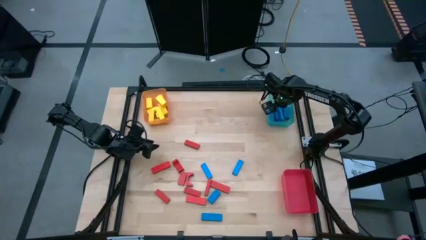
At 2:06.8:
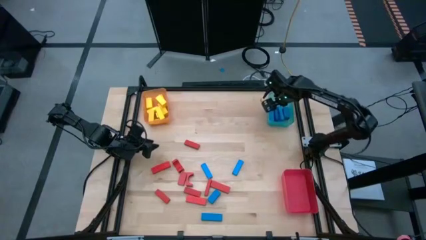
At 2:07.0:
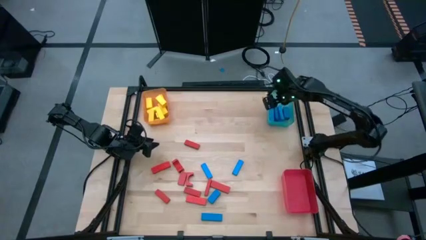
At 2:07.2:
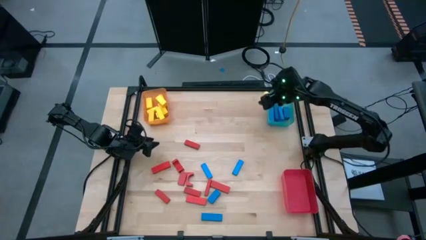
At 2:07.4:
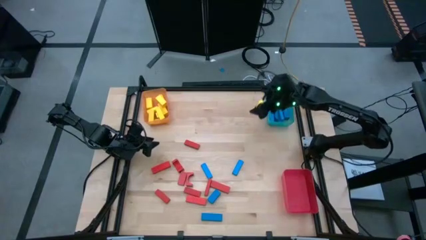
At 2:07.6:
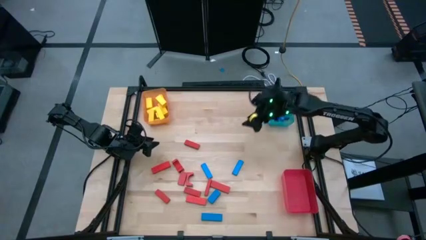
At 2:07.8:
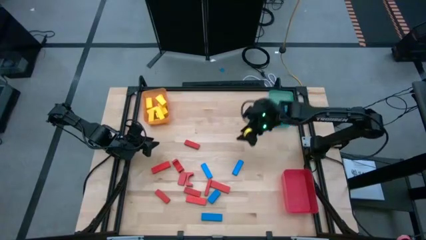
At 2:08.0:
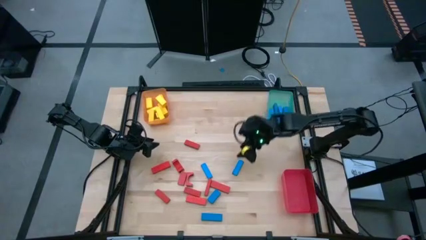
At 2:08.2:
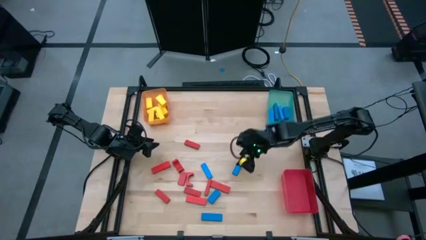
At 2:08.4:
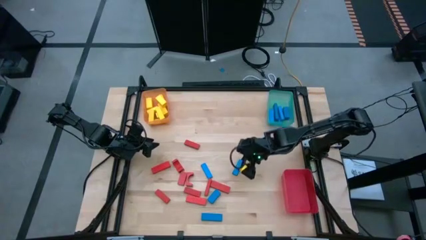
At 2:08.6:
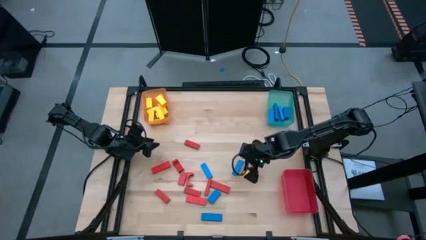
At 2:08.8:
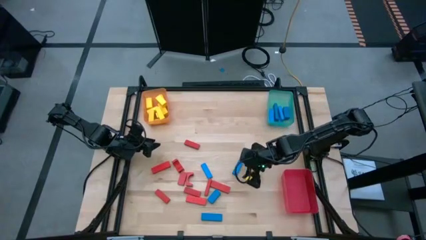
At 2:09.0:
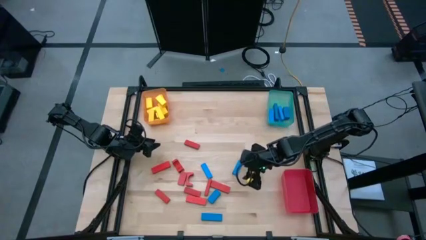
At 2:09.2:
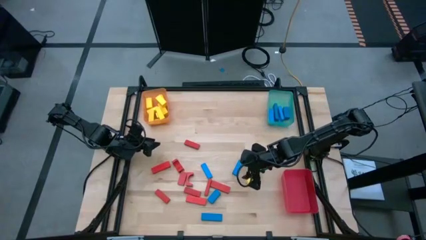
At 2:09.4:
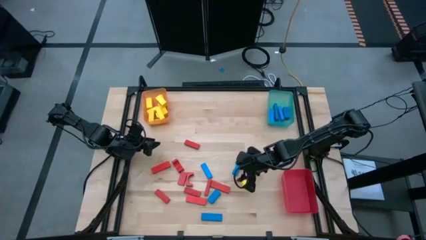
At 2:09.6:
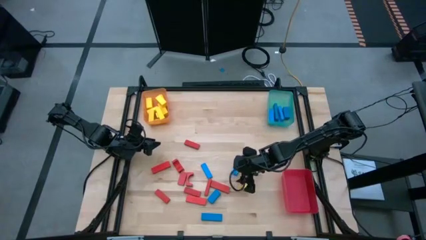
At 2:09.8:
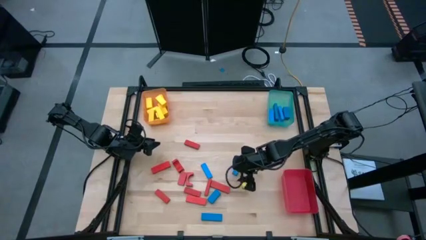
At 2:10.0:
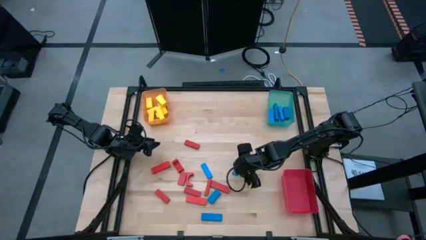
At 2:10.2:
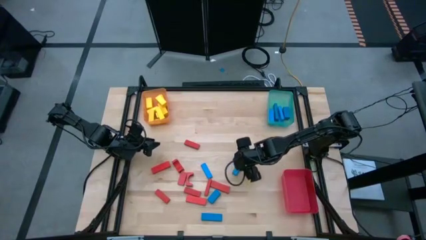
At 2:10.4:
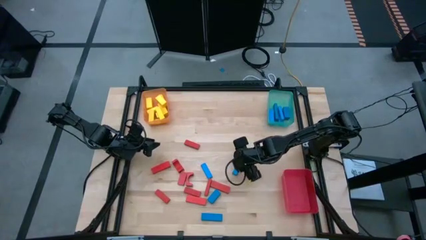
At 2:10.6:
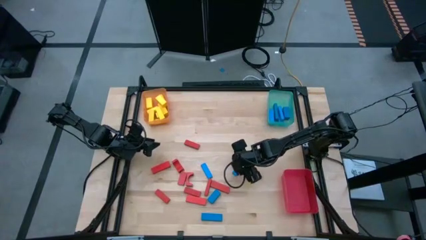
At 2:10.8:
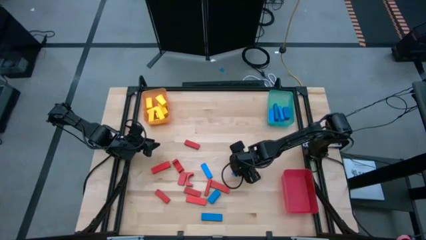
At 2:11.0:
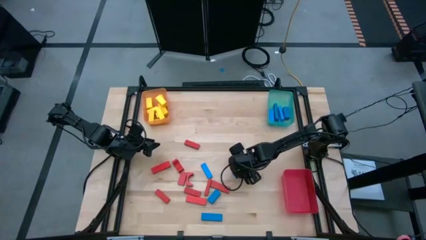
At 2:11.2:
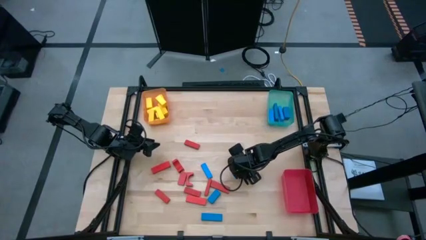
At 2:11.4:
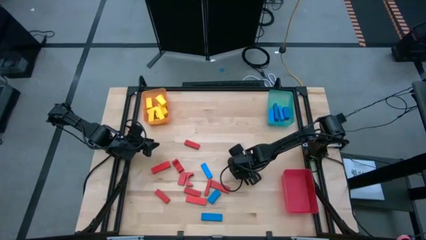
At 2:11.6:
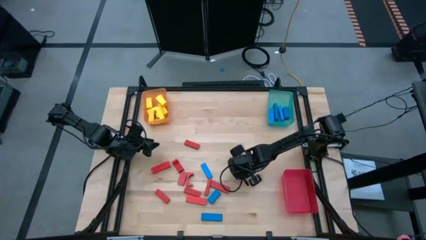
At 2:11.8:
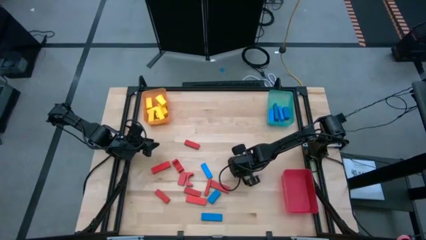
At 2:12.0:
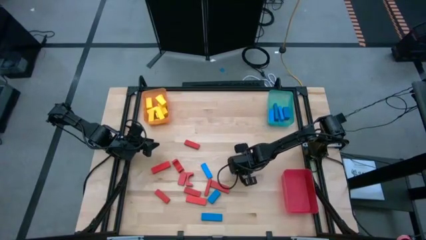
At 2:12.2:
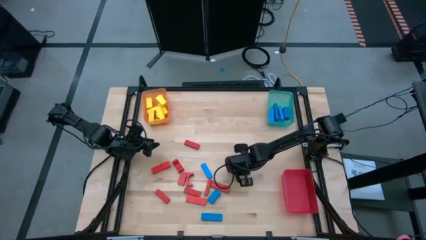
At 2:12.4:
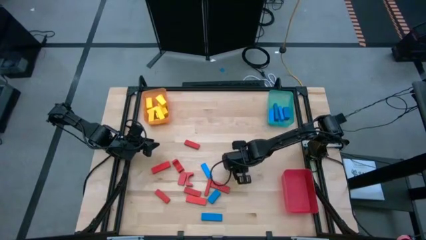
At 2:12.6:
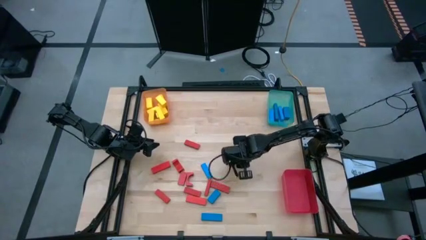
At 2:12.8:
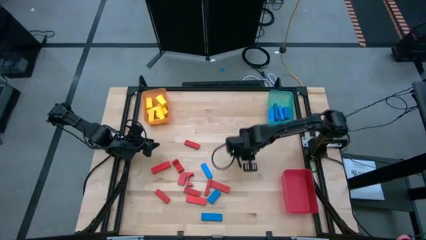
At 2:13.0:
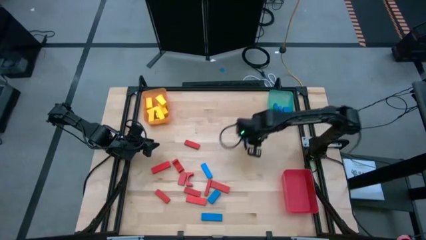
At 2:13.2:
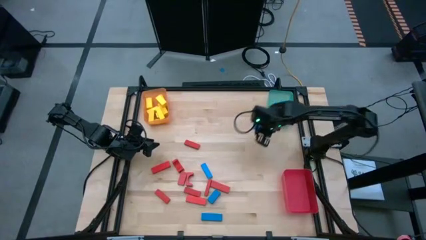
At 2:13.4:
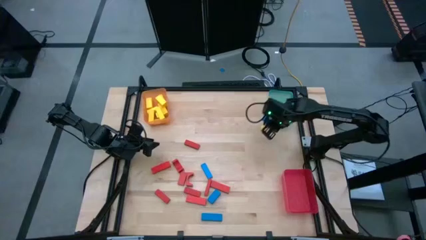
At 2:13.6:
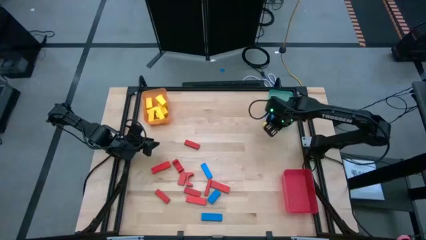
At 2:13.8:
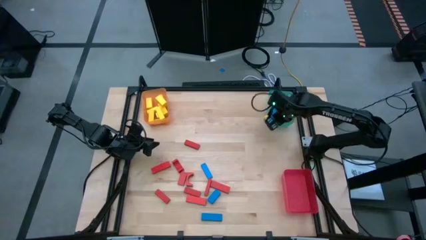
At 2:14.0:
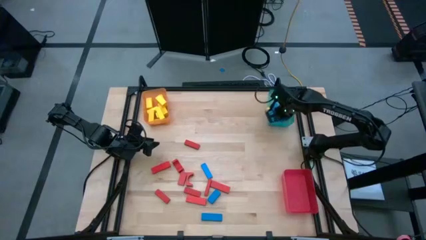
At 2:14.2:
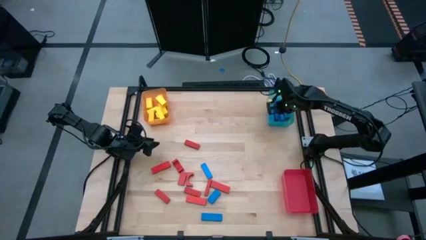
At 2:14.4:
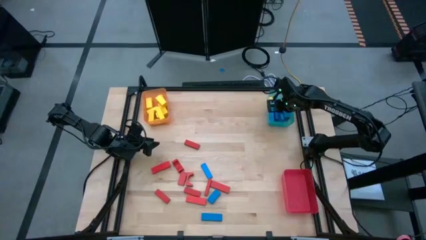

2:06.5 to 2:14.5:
Task: Sort blocks
Put the blue block into the blue bin

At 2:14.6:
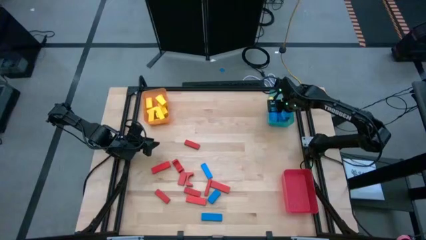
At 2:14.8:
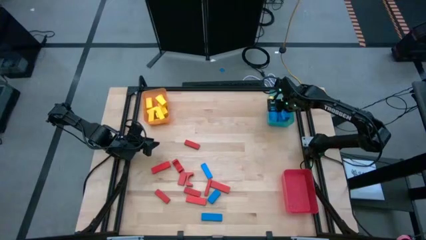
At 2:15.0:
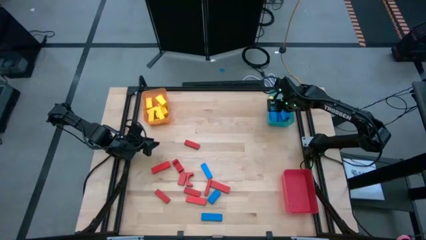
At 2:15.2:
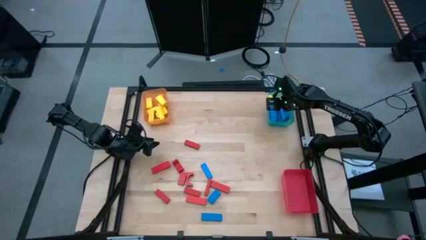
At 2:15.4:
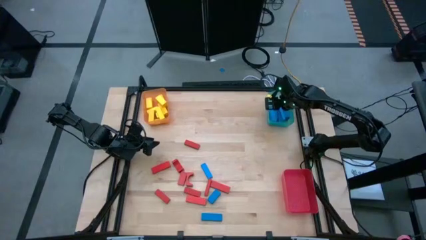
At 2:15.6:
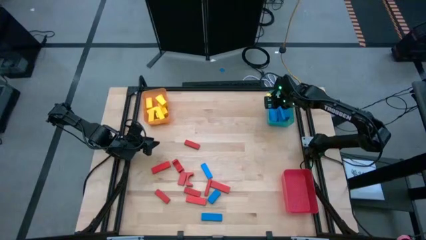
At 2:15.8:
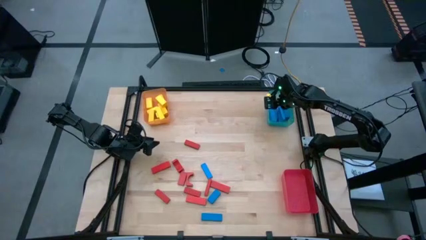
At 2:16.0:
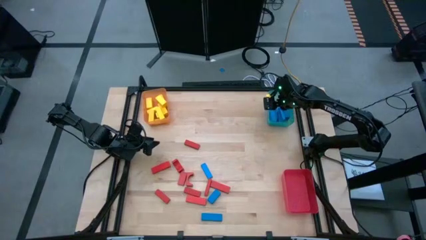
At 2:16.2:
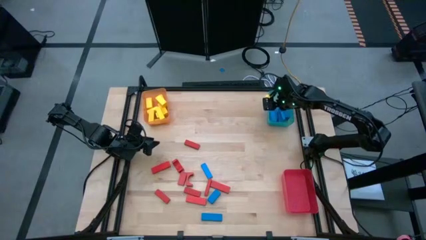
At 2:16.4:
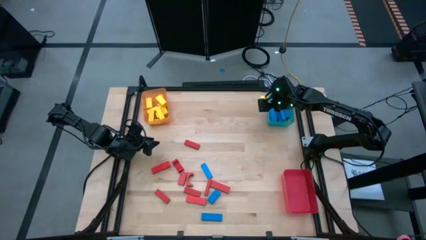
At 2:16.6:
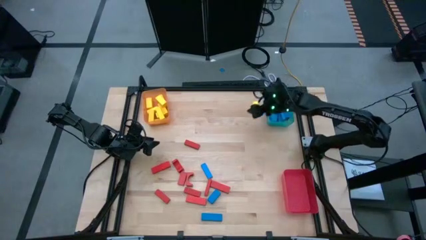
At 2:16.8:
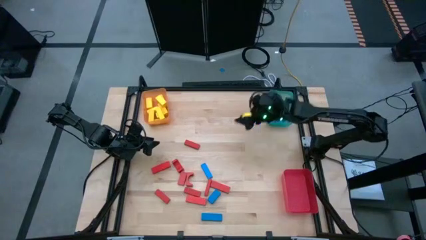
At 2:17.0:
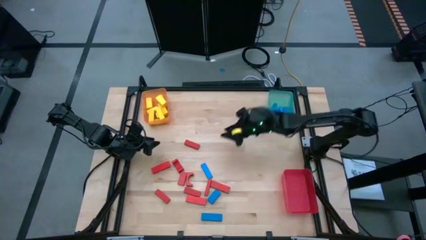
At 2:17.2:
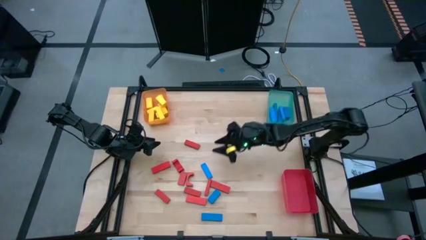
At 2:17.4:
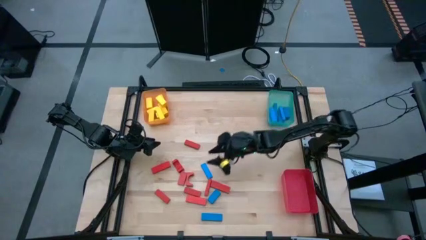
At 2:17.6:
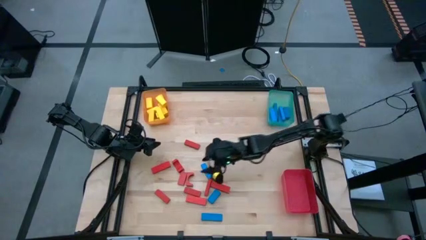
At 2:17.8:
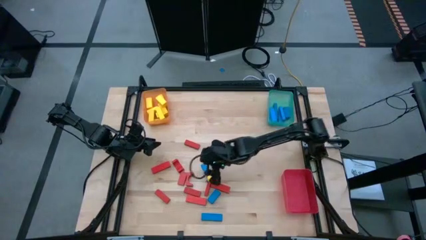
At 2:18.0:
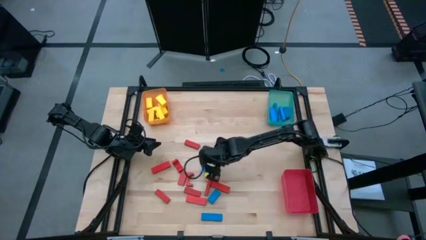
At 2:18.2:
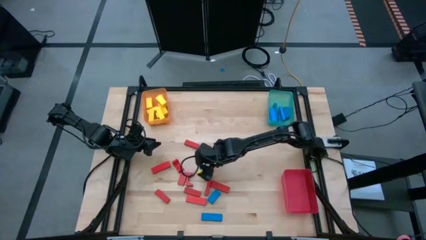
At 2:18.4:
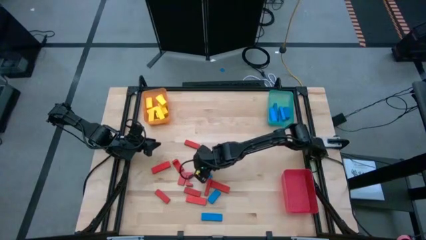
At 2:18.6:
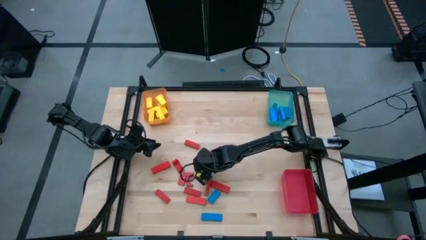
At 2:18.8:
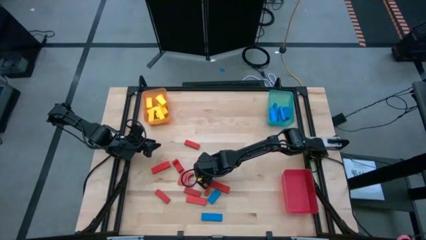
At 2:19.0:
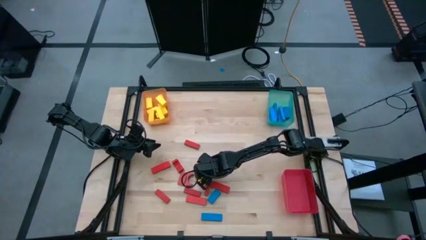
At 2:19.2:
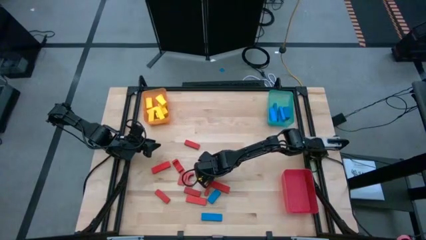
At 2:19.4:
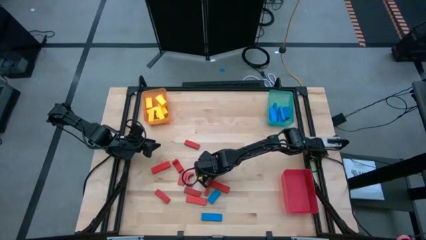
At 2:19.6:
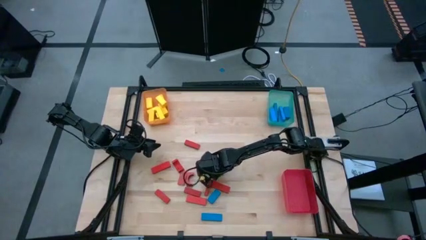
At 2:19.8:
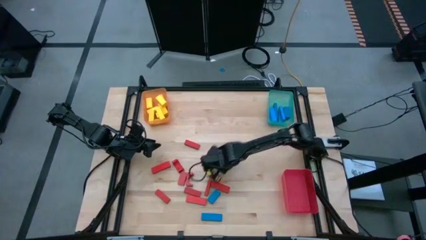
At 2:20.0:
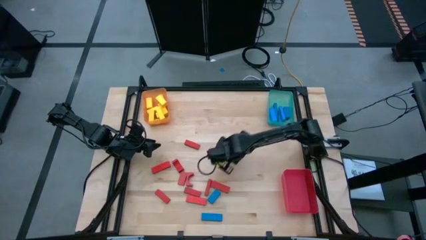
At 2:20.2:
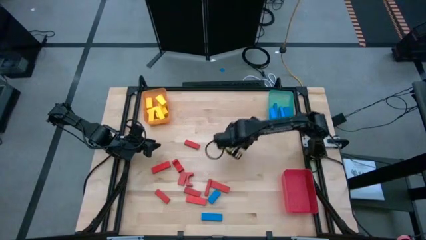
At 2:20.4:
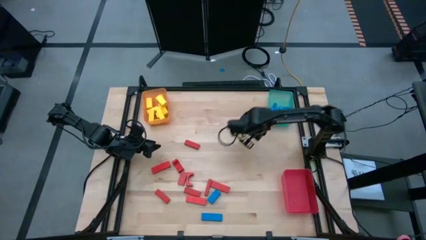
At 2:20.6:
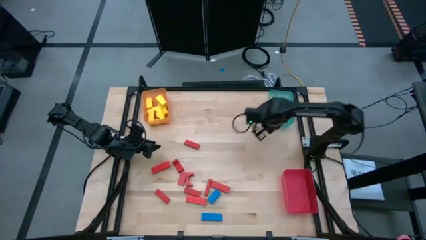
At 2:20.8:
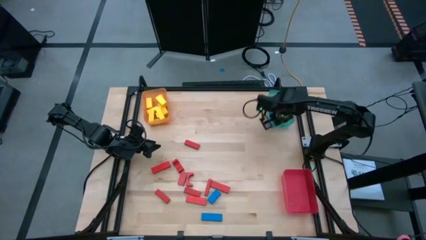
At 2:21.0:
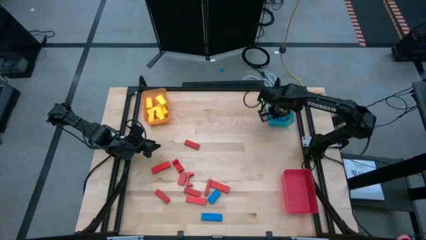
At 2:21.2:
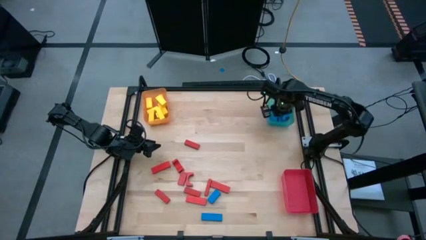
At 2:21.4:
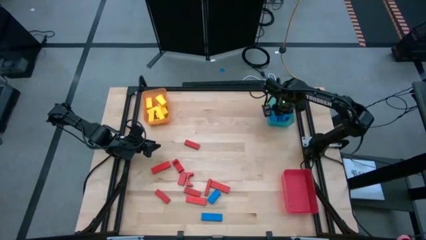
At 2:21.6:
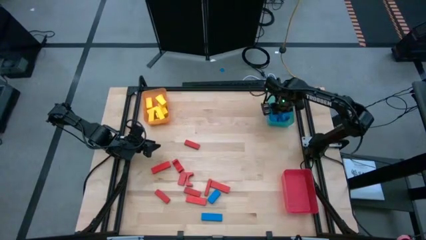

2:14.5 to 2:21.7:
Put the blue block into the blue bin
